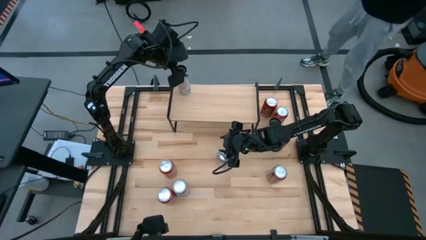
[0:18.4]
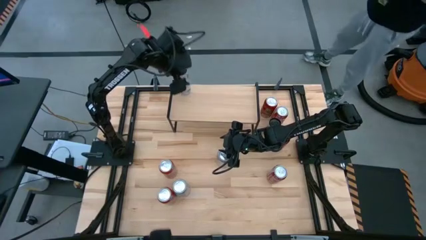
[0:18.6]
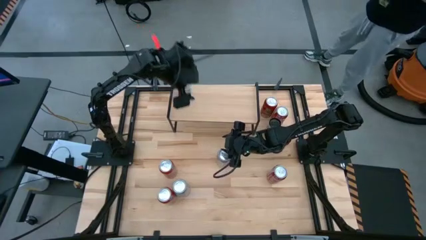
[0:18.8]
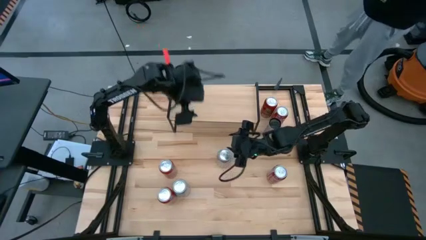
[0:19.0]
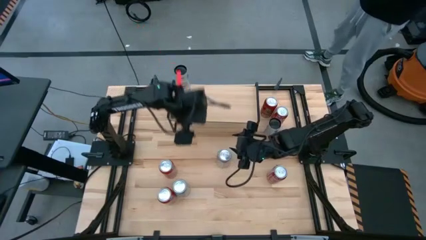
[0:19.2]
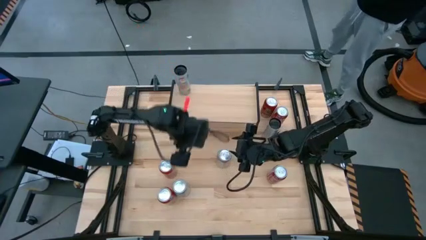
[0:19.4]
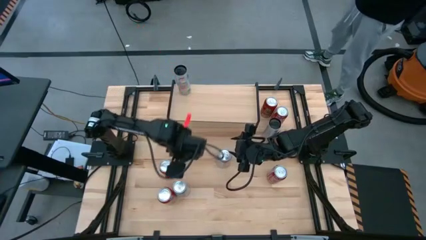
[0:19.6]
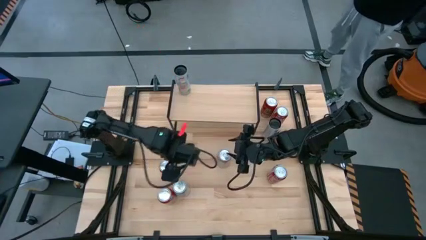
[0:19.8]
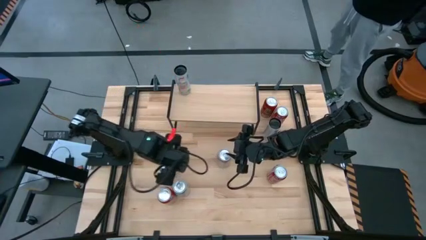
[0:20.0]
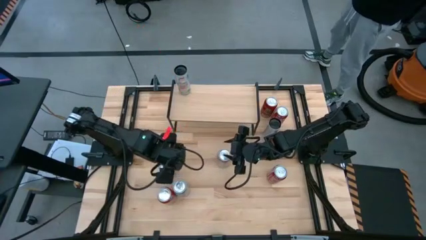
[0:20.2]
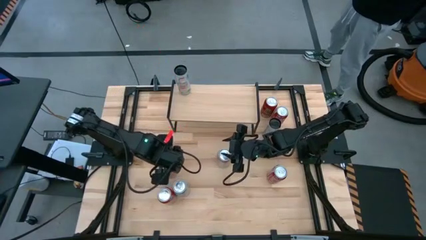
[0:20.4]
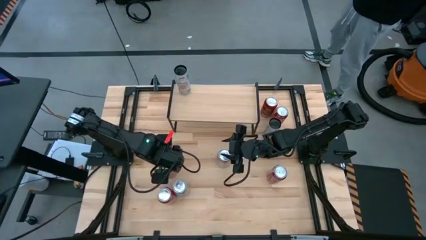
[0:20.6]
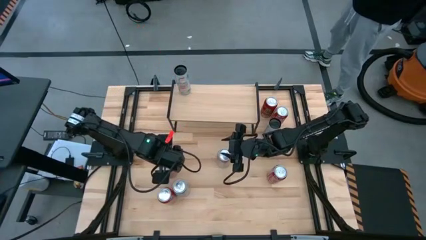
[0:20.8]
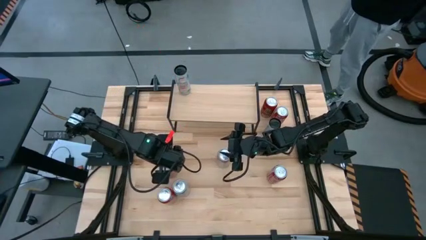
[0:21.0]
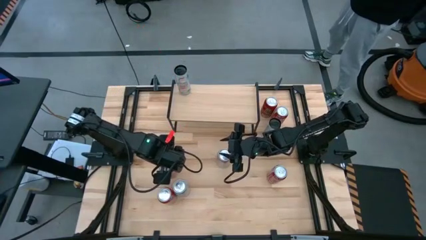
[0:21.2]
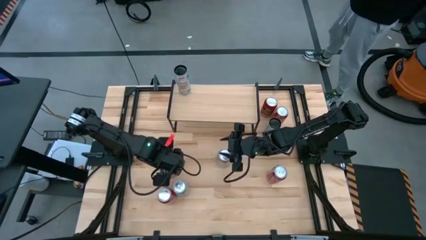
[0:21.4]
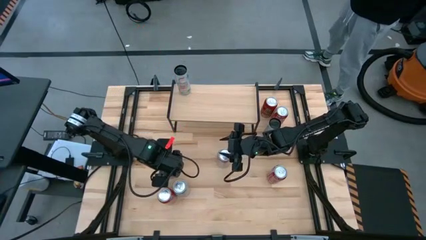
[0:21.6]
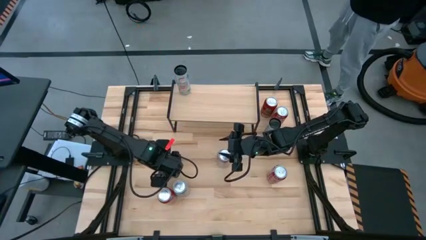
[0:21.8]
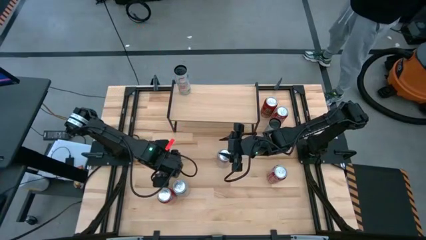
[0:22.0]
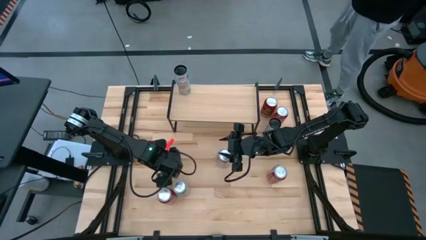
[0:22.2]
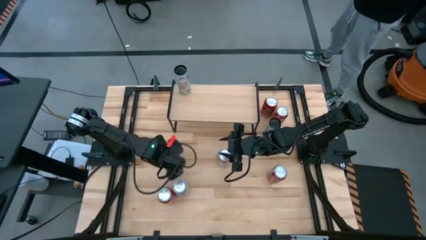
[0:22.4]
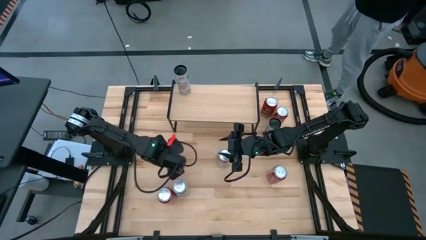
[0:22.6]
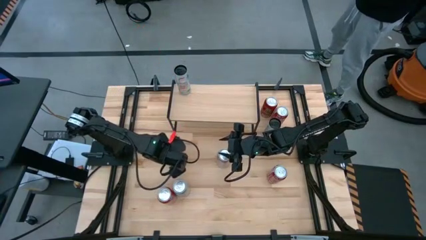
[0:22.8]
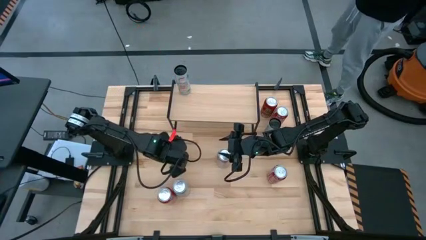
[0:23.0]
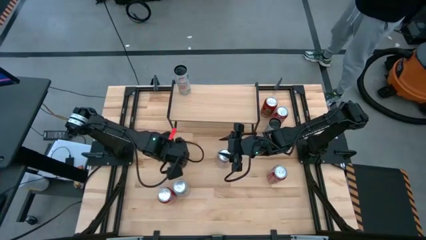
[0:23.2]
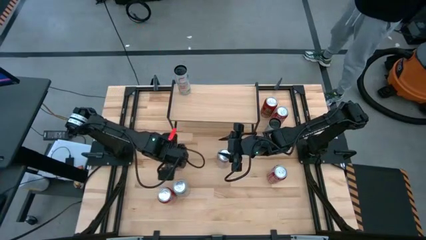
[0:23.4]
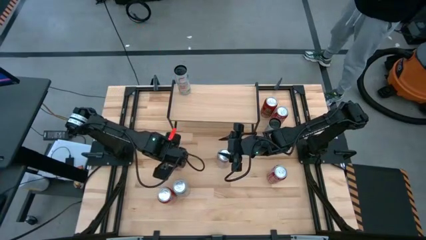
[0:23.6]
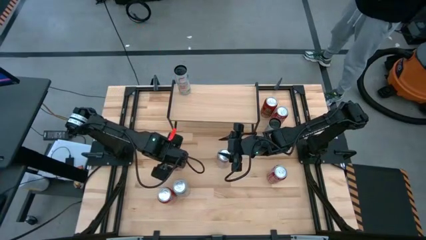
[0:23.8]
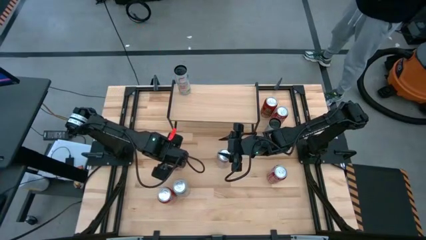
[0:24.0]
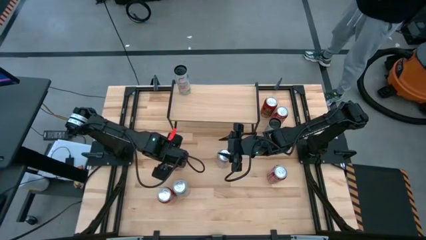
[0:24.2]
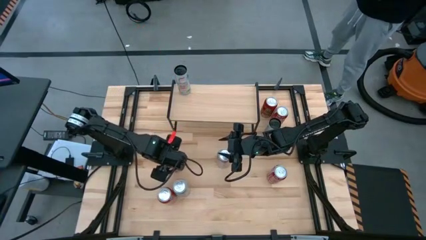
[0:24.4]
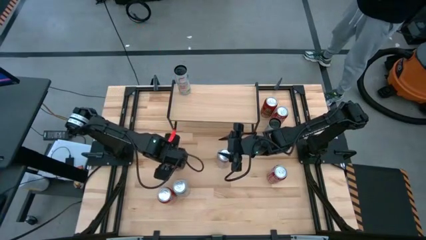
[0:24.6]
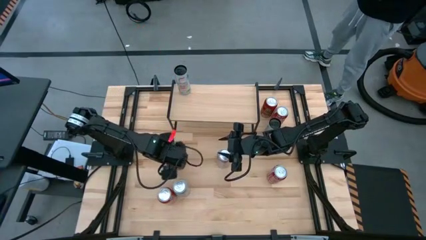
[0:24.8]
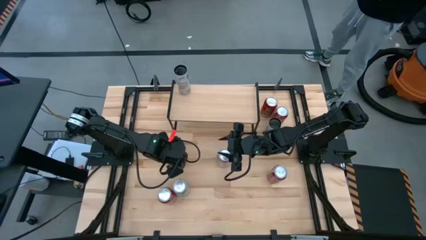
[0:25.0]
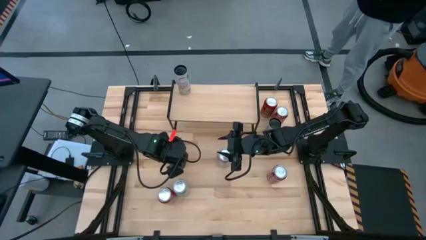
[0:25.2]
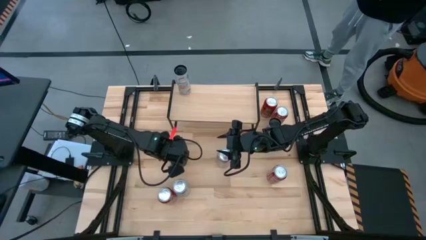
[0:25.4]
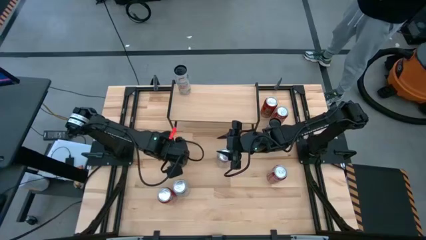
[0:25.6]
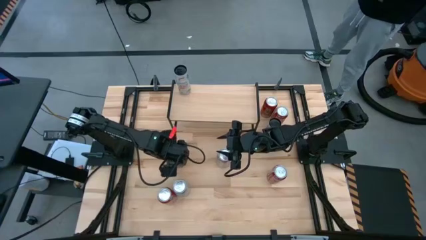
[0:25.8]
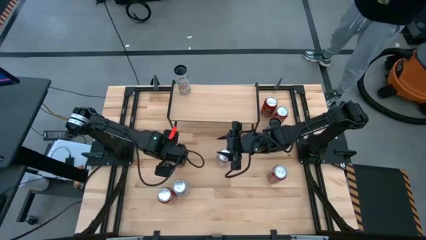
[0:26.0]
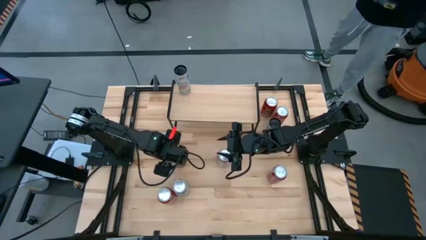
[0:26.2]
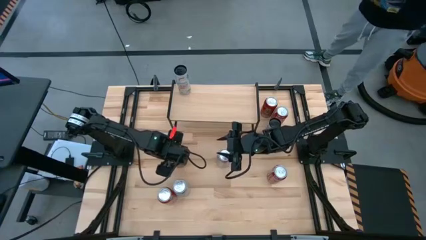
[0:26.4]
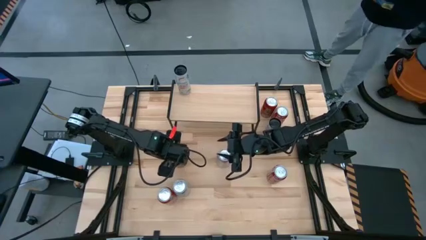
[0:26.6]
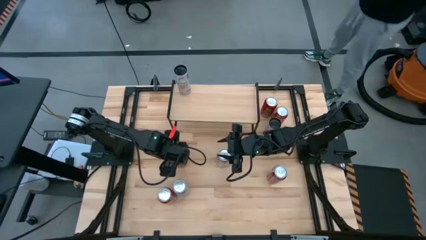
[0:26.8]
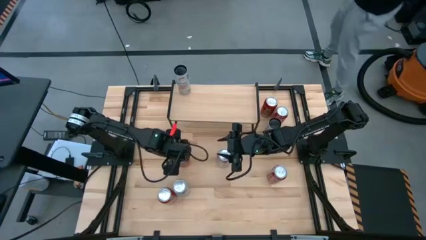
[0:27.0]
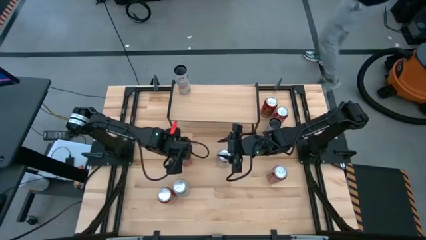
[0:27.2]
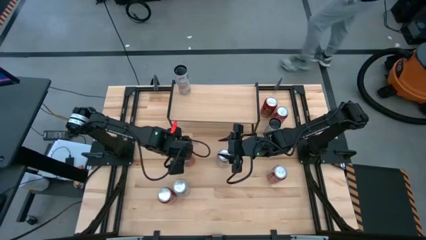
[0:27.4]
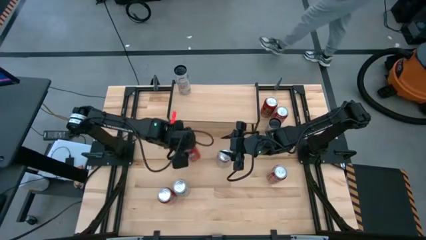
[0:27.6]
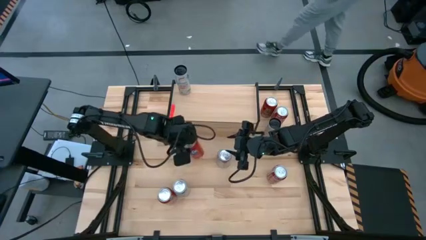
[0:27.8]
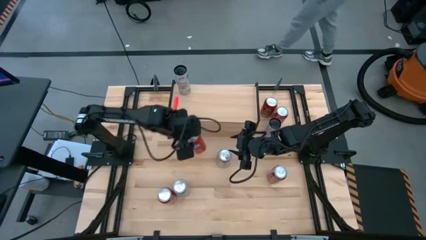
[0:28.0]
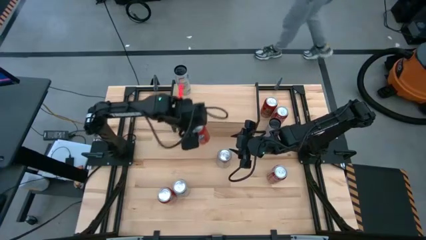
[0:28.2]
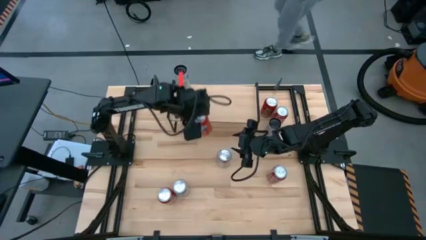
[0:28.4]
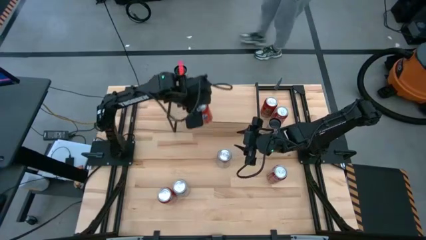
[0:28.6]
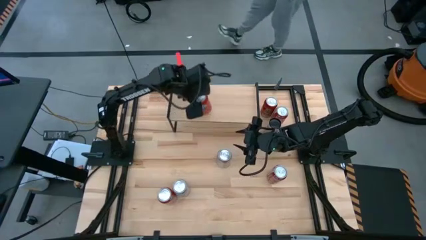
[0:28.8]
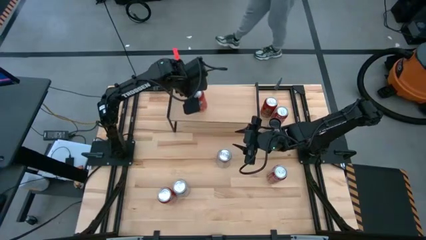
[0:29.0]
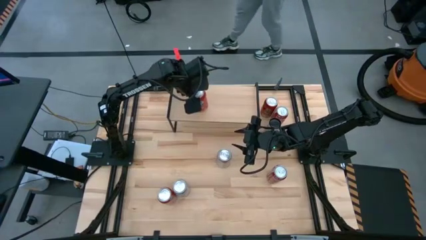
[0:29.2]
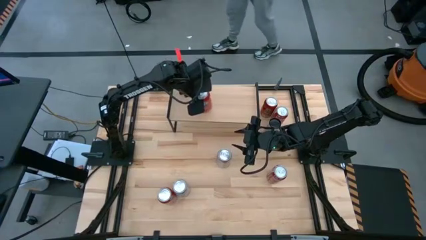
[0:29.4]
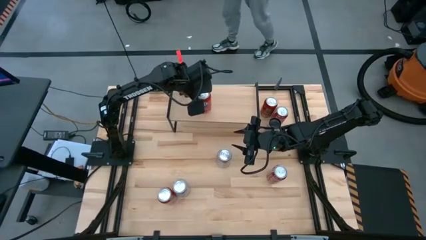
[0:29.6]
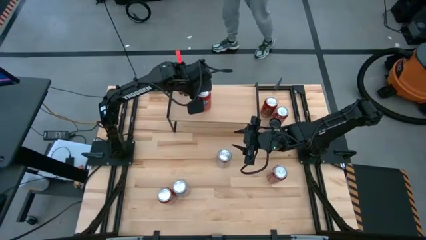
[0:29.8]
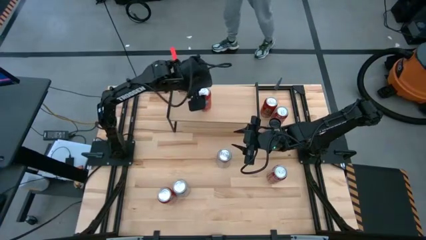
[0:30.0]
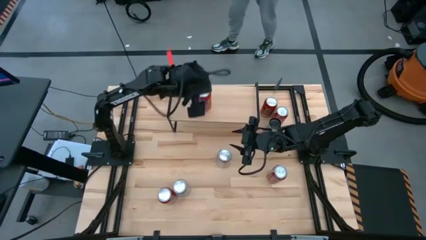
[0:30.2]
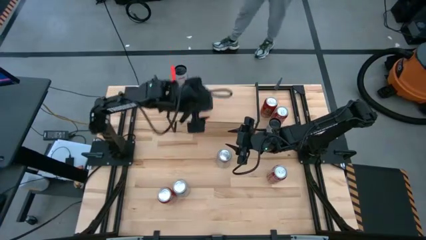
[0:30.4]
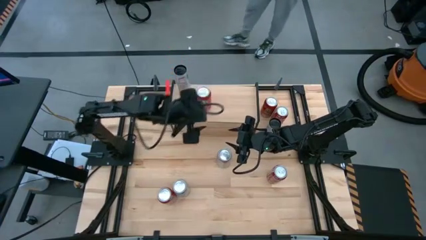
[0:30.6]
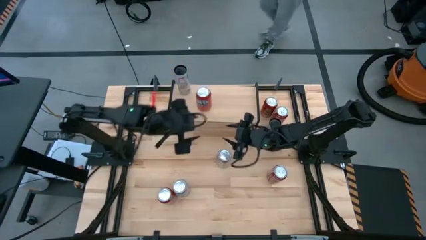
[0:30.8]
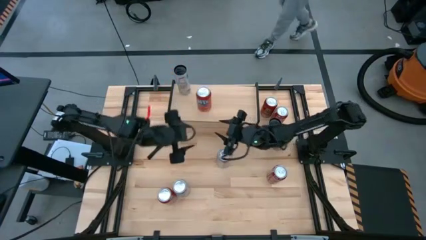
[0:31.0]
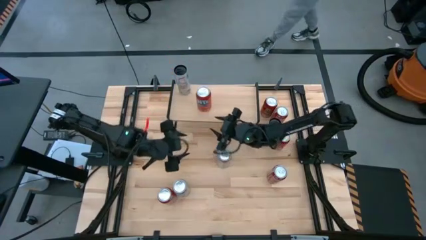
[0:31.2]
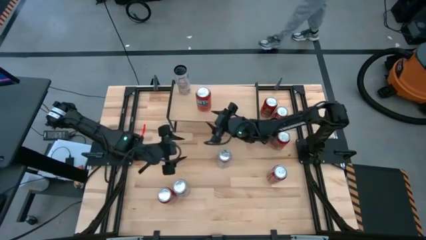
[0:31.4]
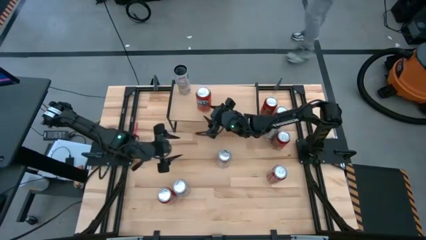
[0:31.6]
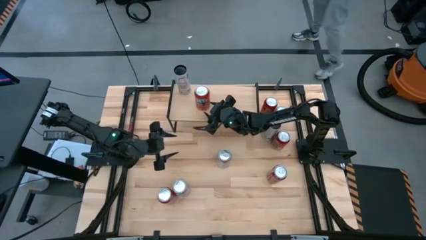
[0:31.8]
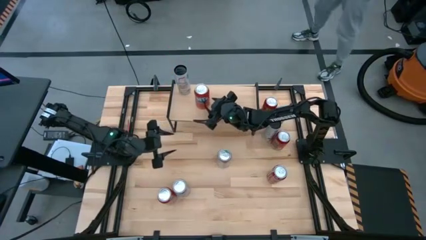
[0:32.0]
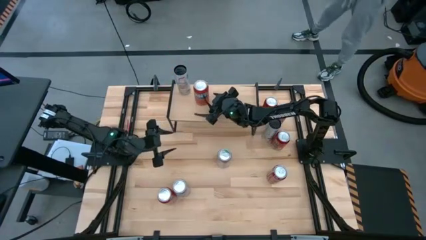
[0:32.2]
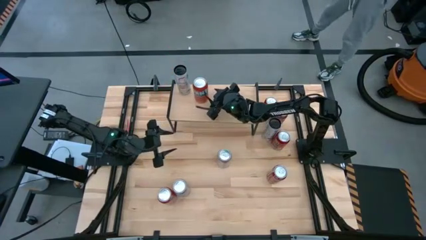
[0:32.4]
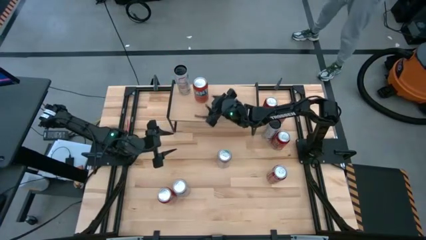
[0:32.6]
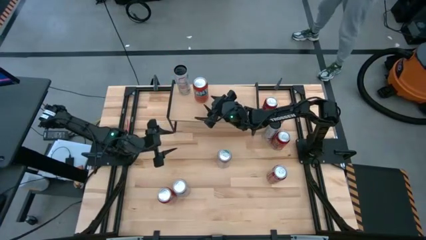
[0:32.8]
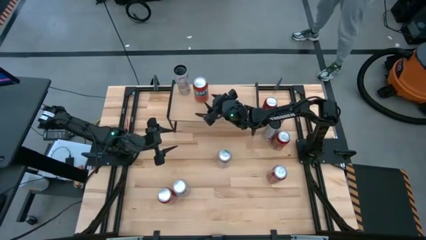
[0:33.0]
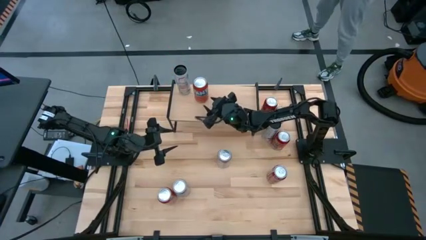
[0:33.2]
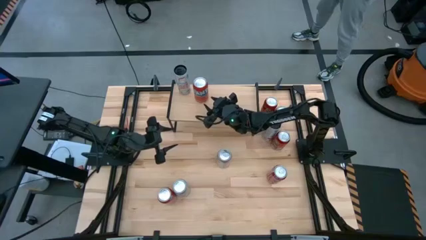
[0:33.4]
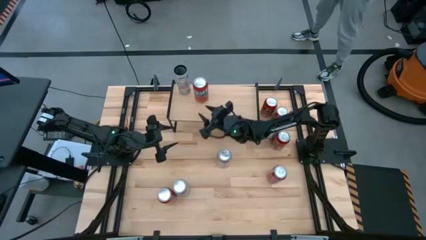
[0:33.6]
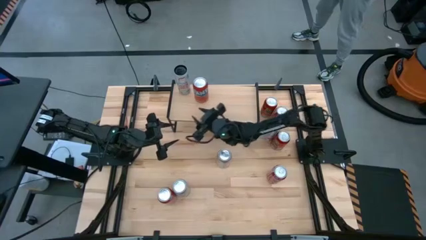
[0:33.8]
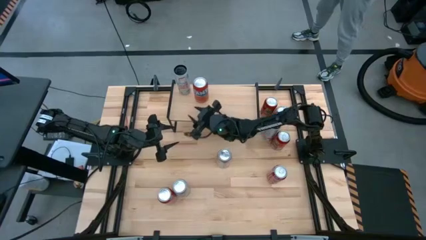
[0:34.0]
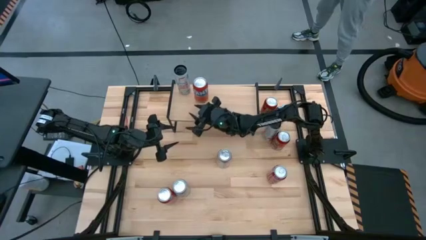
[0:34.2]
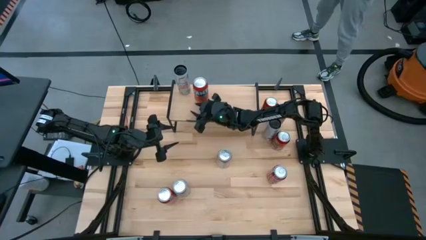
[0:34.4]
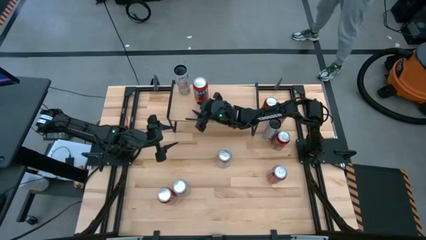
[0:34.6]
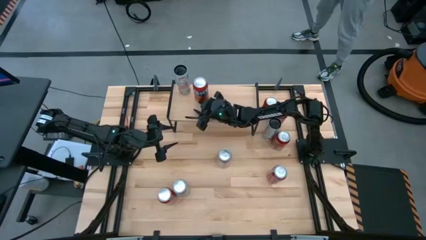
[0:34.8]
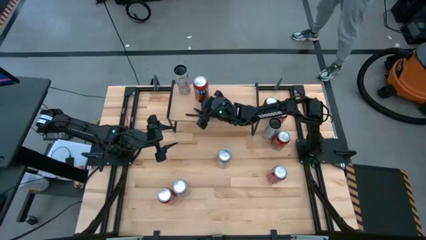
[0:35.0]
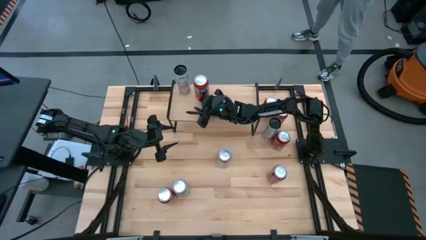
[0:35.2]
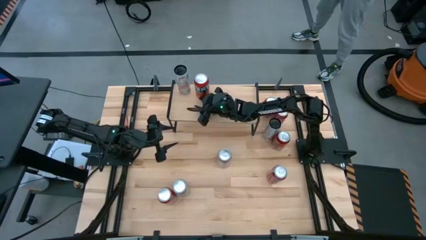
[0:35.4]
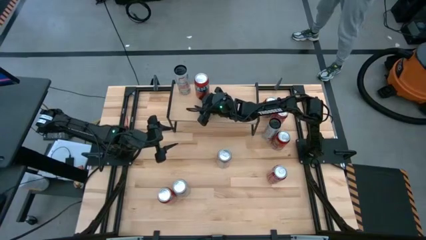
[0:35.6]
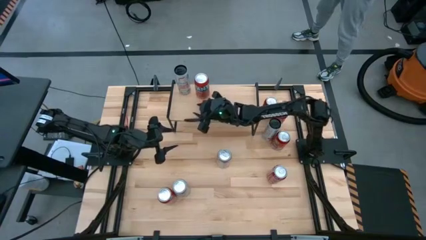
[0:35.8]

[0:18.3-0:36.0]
Task: Place canned beverage on shelf
Put the top left orange soda can on the shelf
